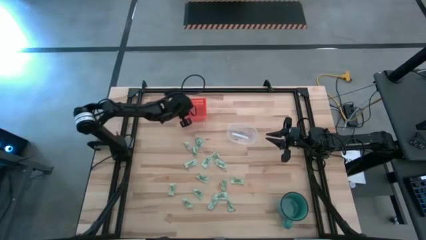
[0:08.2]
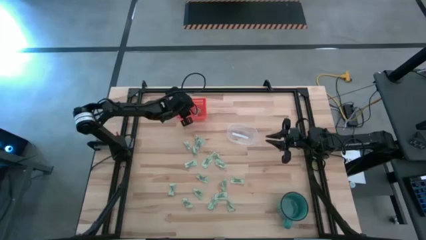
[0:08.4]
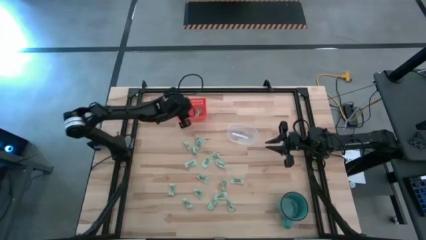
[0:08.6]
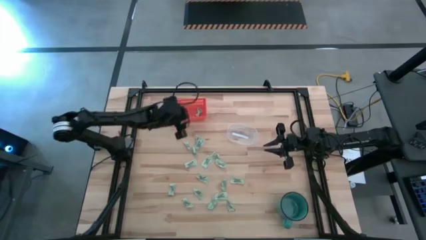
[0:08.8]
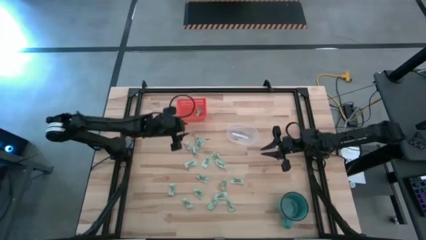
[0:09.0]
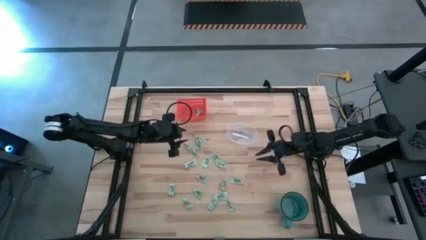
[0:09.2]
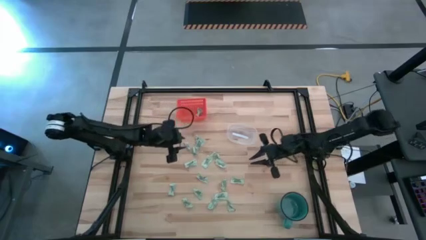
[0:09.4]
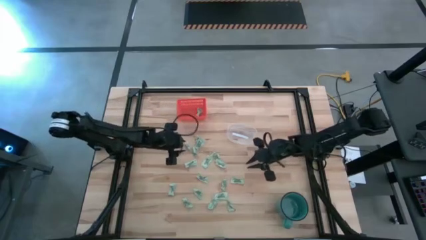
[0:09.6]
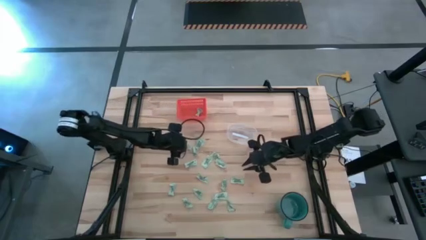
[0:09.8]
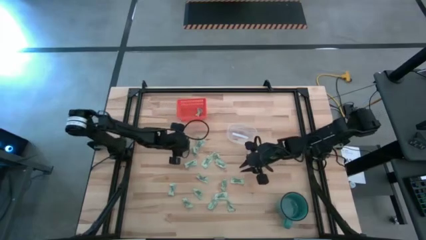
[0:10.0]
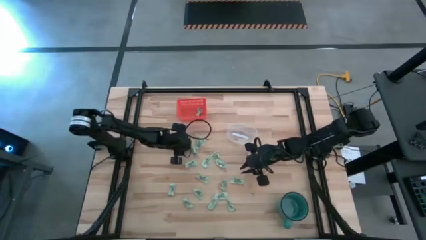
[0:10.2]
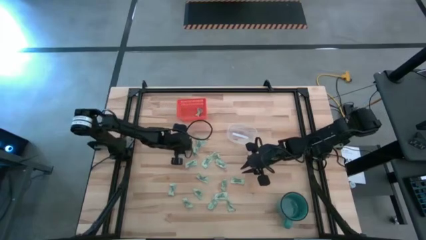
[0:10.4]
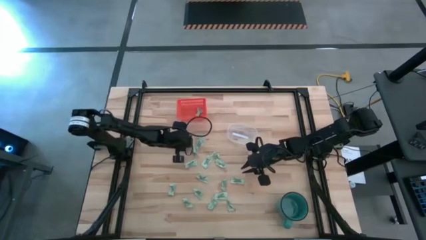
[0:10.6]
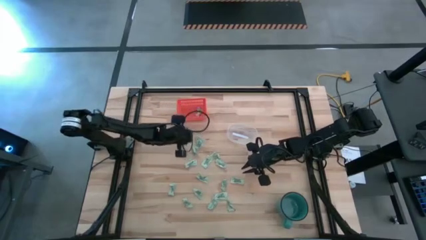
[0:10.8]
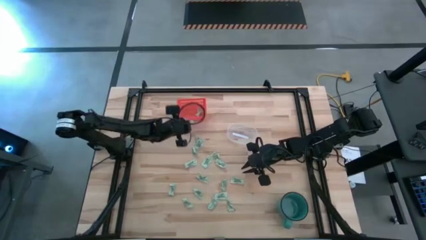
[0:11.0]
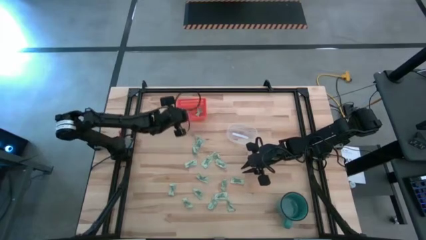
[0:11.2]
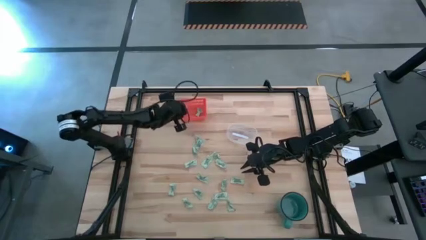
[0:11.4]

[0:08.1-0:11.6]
Task: Pick and place items into bin
Put the green stevia packet into the orange bin

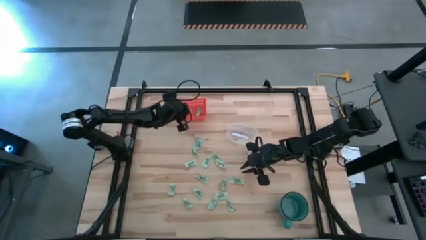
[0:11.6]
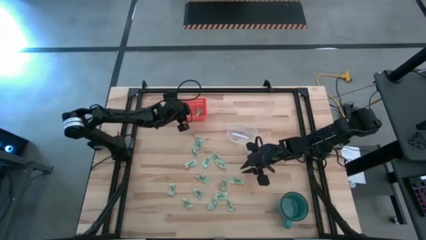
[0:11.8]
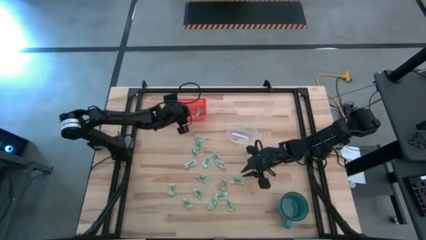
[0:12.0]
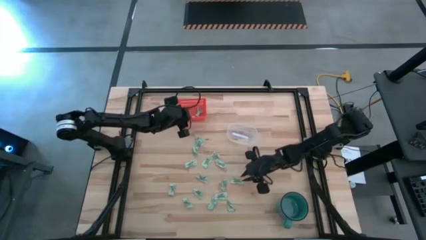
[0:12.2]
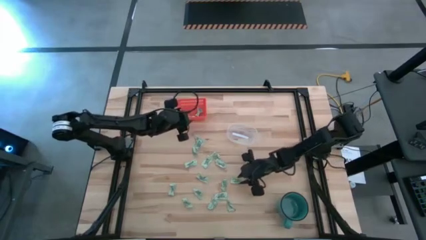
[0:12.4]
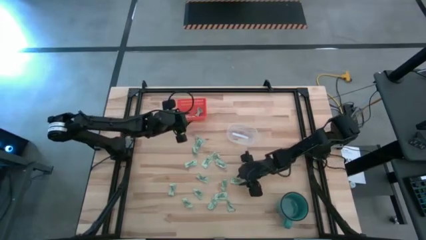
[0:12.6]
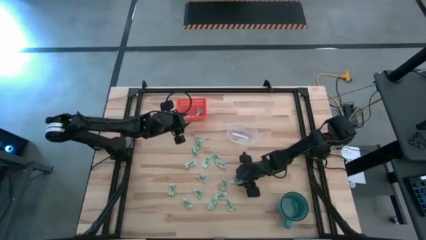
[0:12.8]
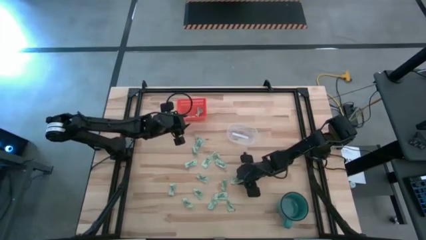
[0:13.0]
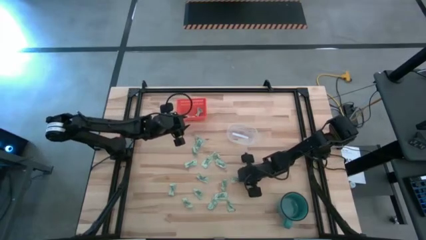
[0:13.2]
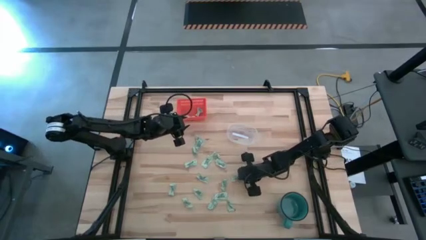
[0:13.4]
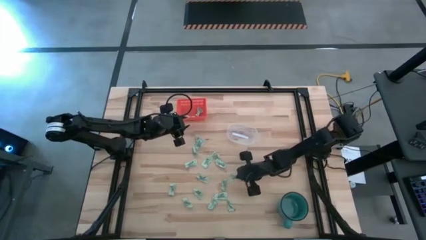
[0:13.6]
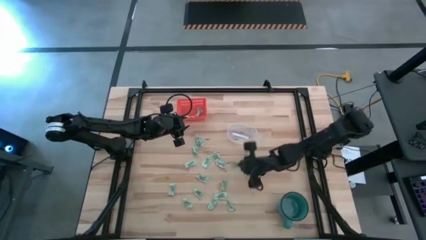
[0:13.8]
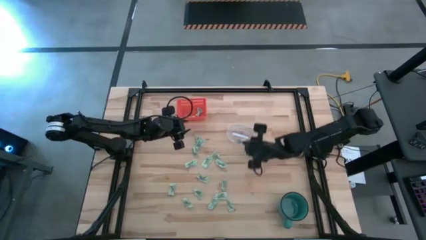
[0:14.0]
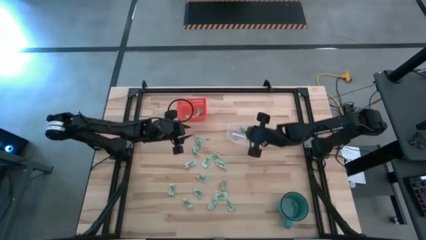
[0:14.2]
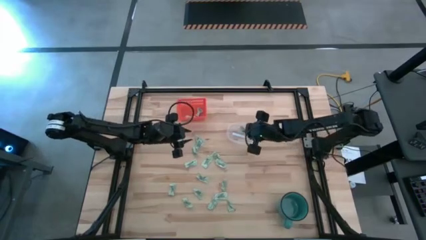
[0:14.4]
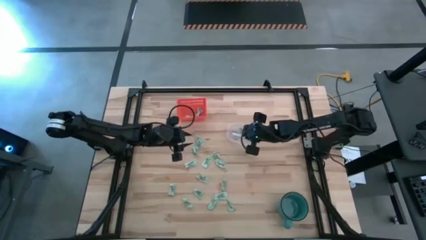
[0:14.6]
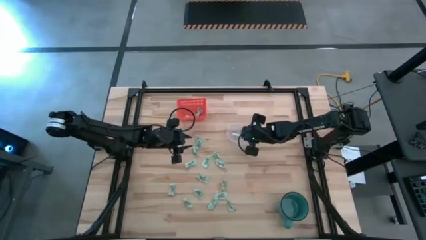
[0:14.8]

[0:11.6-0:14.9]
Put the green stevia packet into the transparent bin

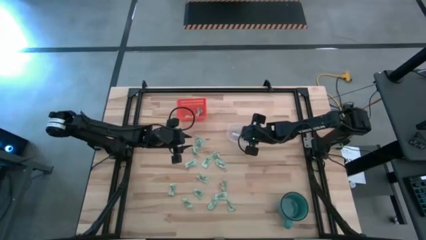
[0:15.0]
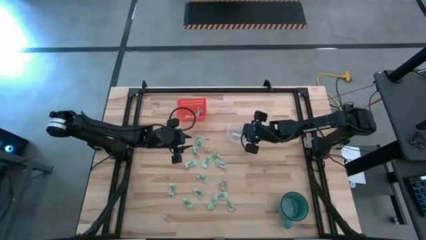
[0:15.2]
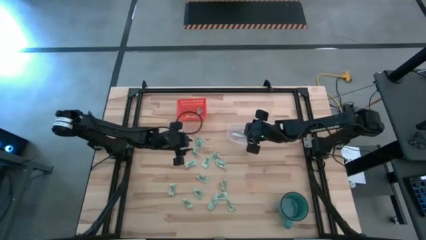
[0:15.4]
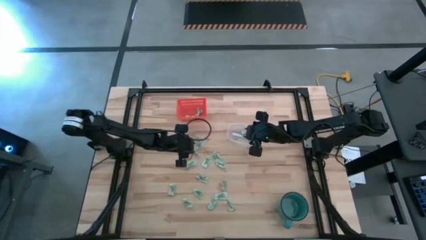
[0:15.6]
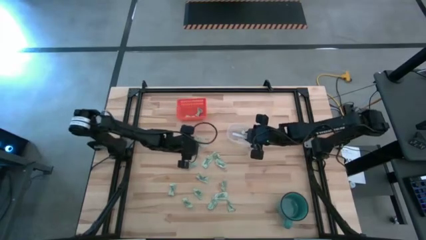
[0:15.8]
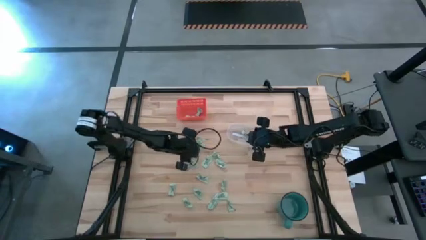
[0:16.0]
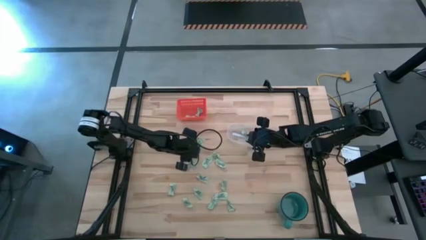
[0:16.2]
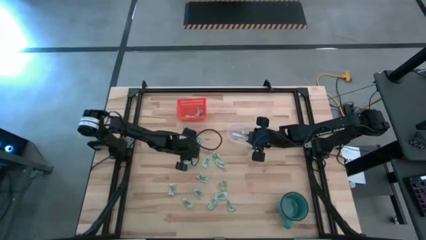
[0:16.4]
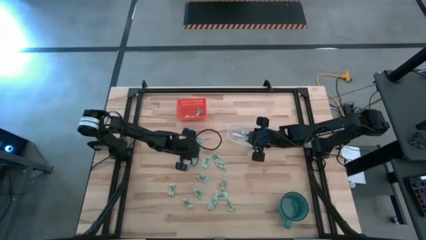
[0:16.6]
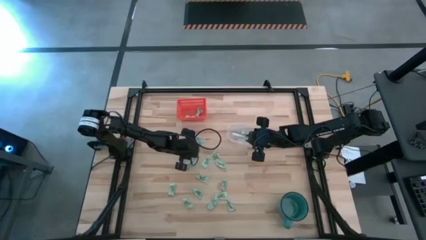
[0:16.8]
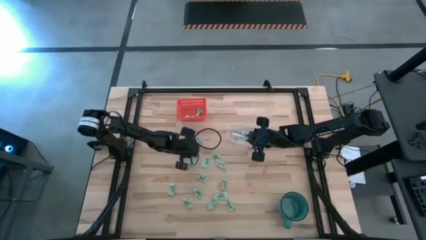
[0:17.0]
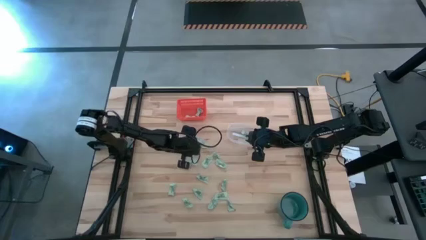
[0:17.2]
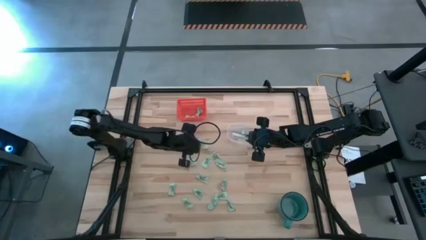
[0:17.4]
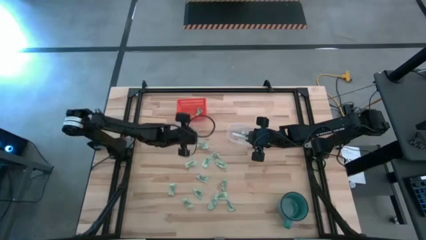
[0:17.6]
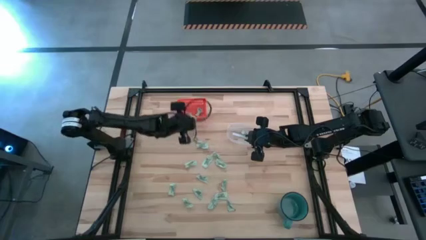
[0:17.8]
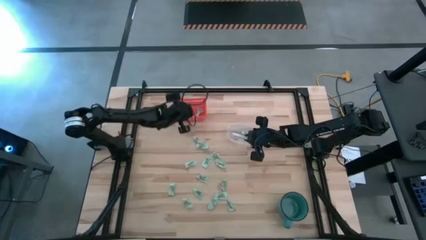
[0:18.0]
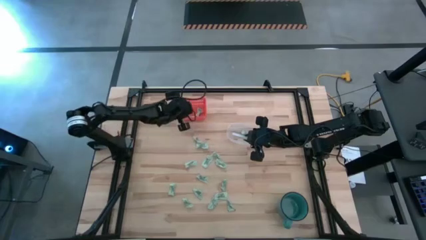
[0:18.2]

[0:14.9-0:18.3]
Put the green stevia packet into the orange bin

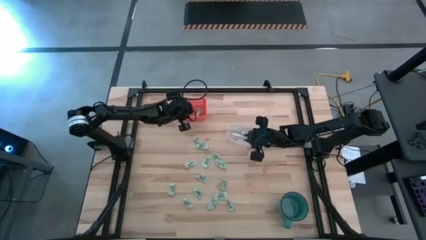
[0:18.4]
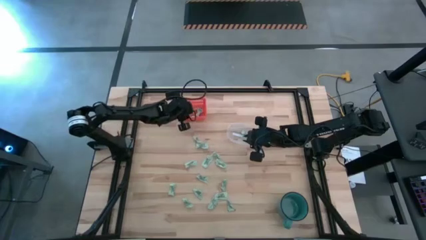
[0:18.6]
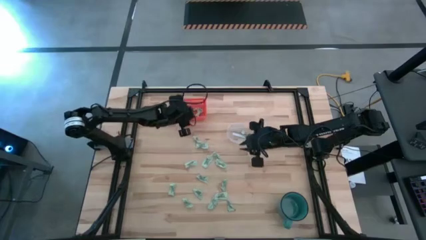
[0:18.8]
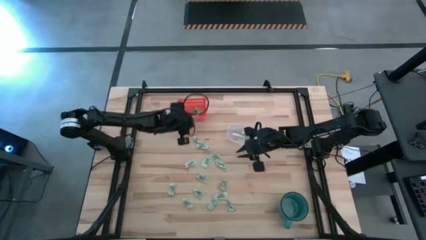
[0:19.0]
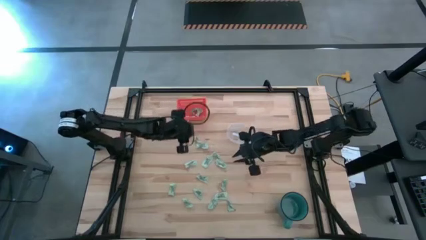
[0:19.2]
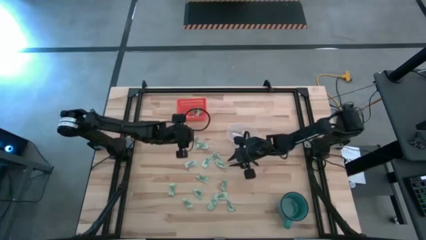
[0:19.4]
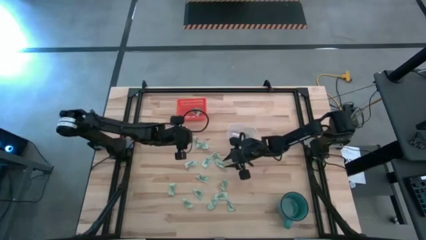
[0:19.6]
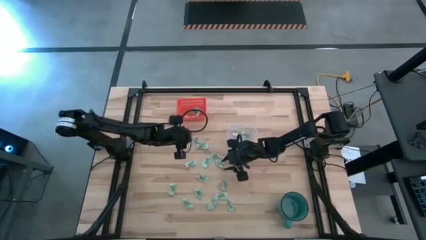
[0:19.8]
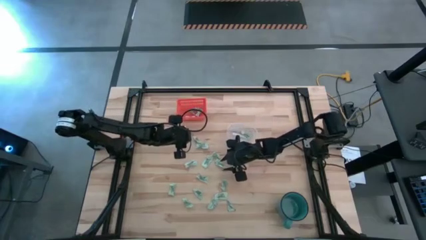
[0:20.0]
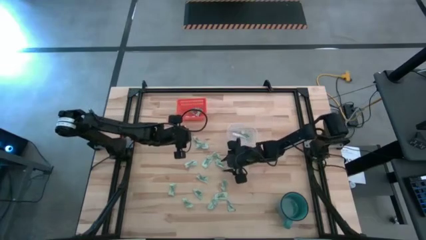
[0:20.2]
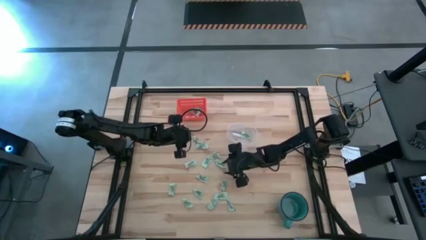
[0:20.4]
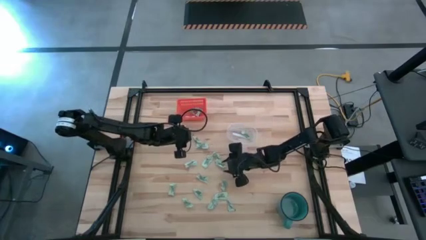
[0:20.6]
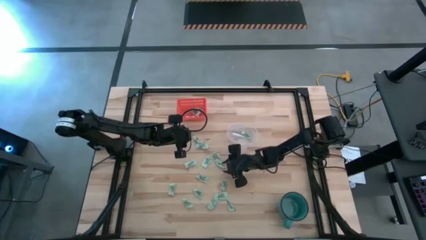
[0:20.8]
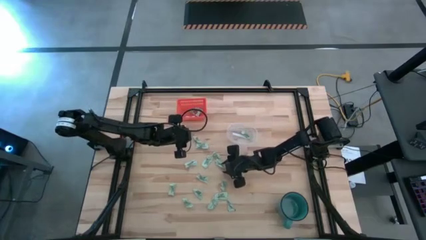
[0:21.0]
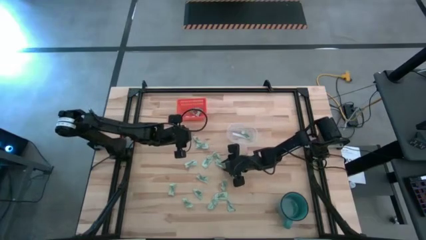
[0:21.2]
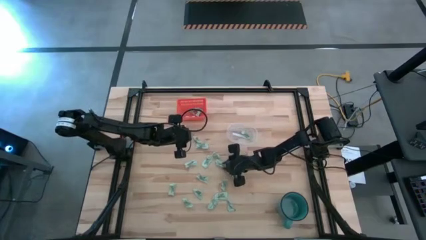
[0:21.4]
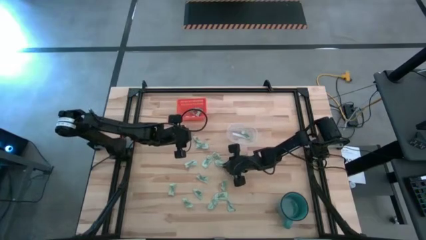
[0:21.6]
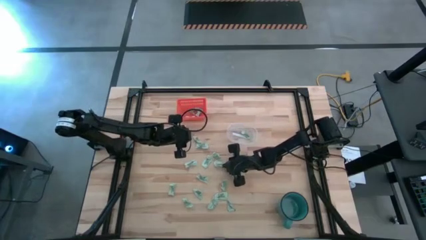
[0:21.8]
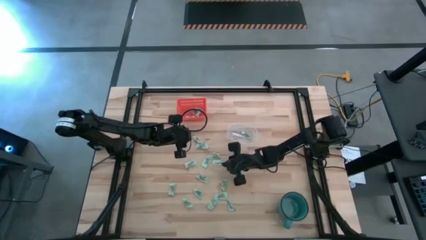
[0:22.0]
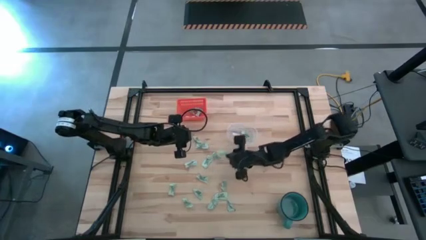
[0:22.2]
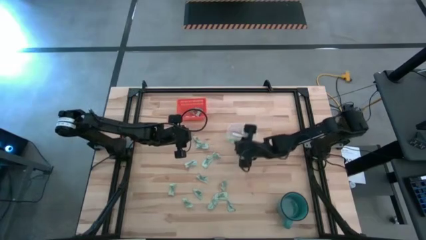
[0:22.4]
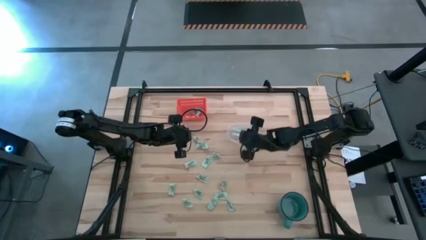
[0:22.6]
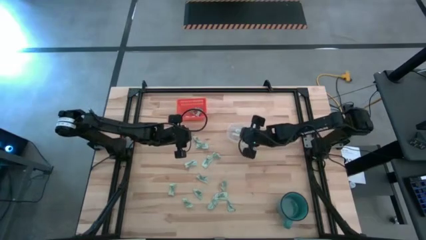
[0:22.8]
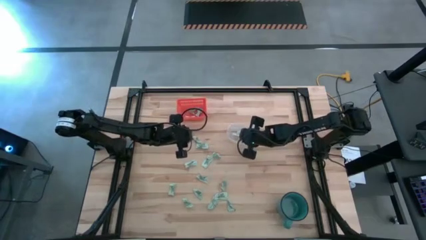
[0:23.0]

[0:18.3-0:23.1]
Put the green stevia packet into the transparent bin

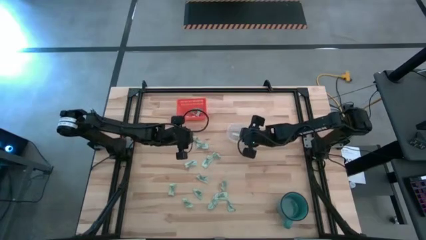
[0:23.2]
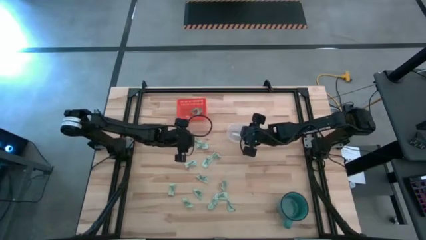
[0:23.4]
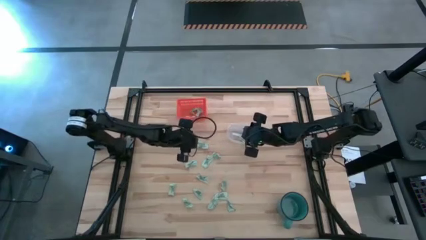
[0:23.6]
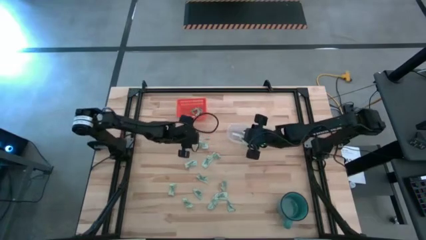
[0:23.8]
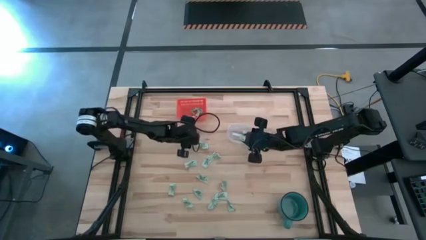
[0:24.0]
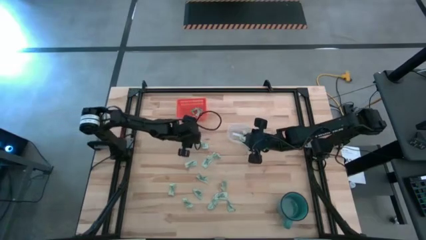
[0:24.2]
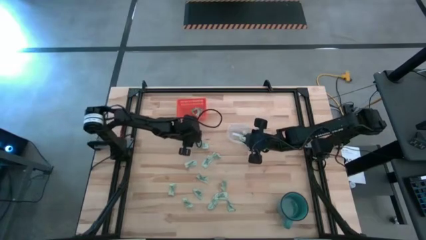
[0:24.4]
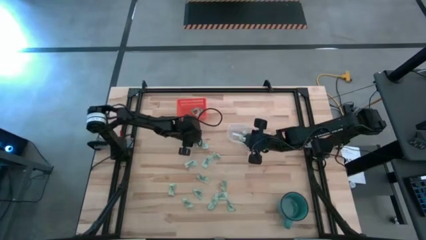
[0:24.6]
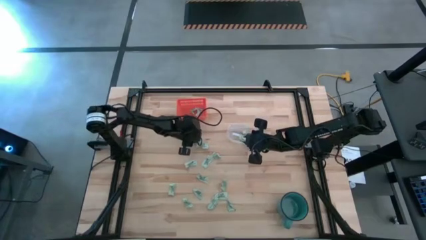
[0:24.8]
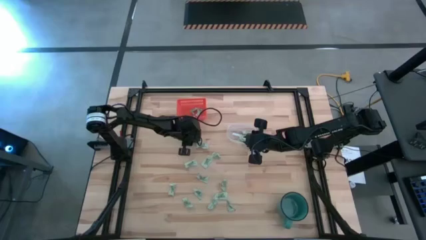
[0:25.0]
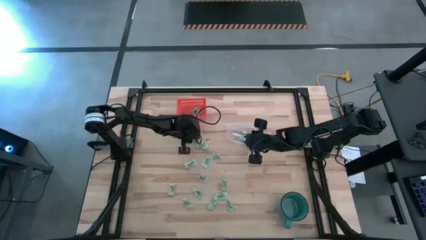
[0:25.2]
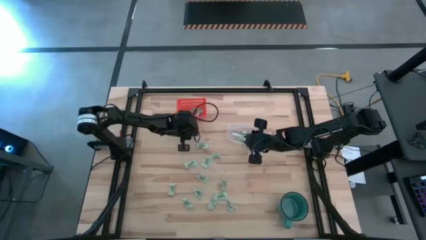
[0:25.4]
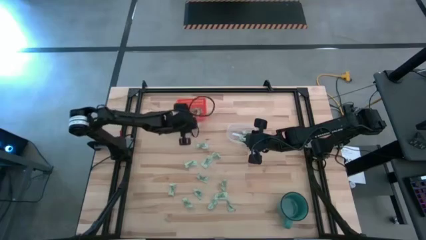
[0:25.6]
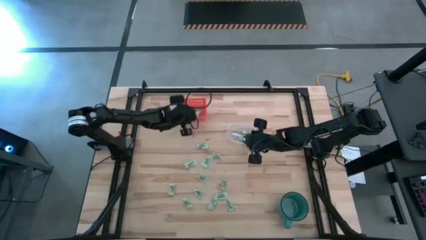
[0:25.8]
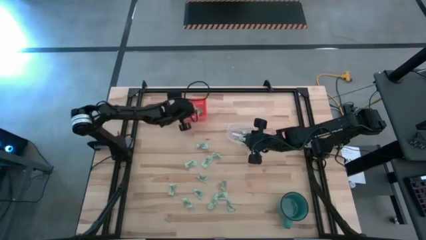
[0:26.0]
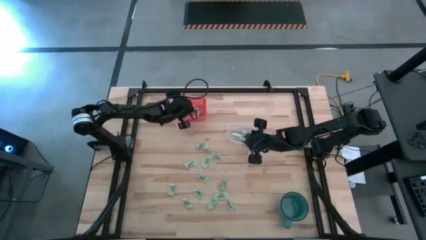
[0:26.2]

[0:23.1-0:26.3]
Put the green stevia packet into the orange bin
